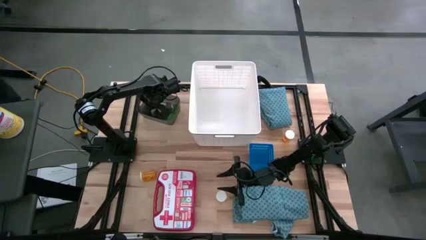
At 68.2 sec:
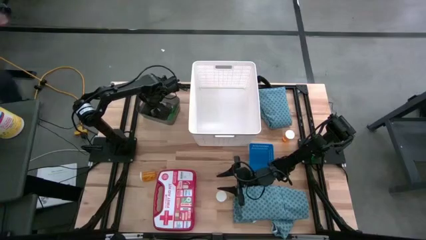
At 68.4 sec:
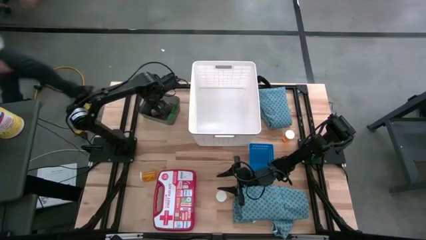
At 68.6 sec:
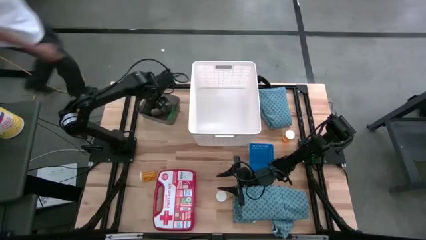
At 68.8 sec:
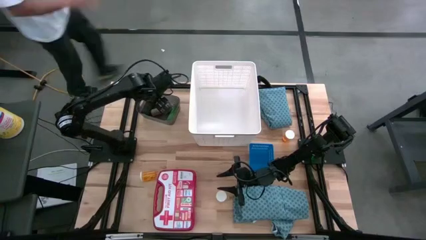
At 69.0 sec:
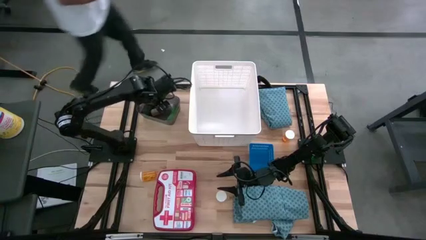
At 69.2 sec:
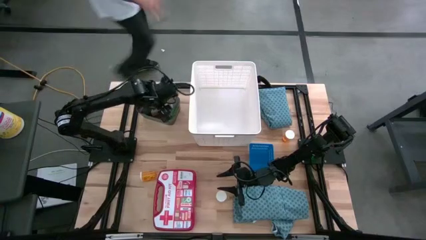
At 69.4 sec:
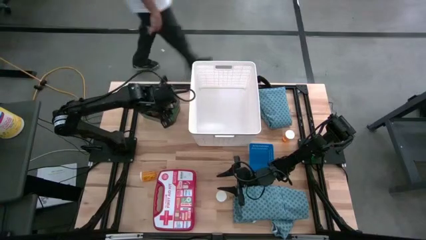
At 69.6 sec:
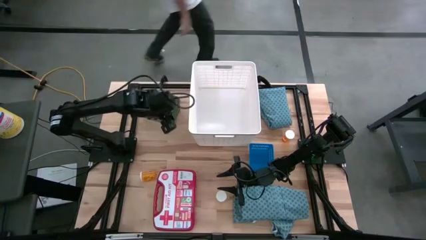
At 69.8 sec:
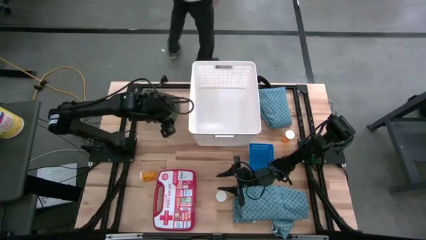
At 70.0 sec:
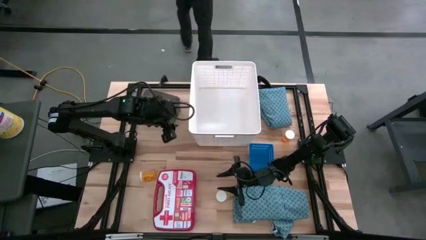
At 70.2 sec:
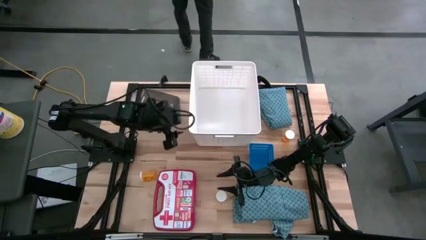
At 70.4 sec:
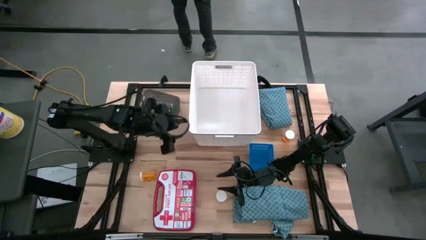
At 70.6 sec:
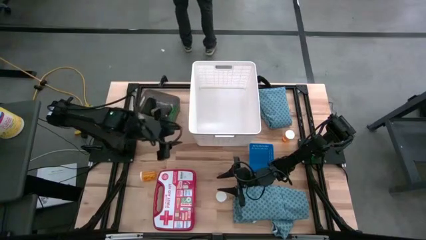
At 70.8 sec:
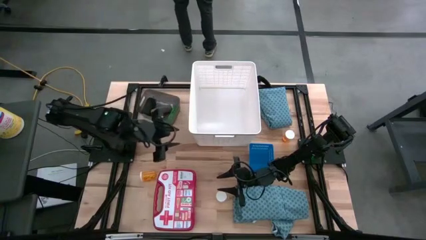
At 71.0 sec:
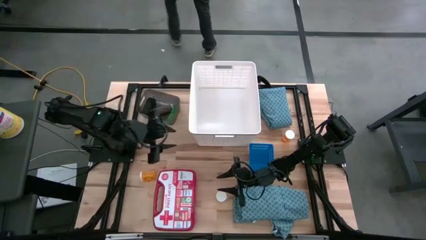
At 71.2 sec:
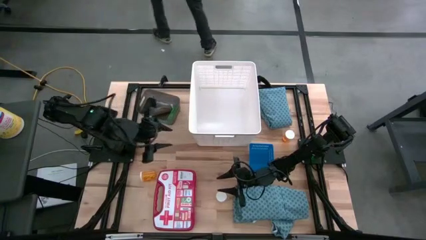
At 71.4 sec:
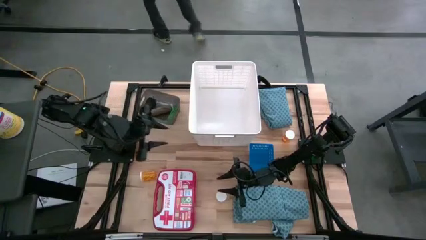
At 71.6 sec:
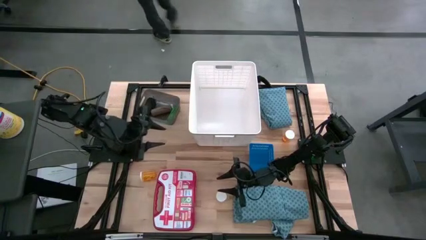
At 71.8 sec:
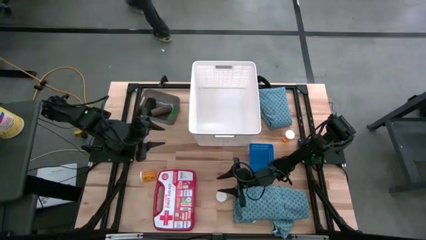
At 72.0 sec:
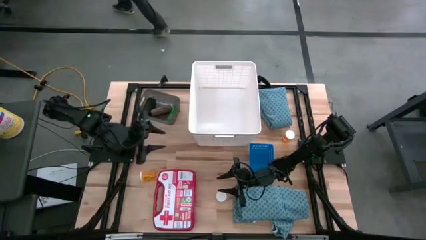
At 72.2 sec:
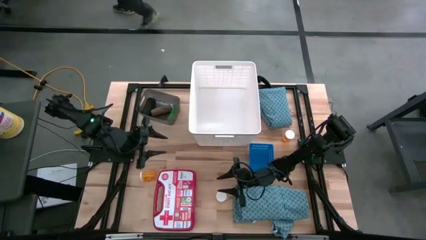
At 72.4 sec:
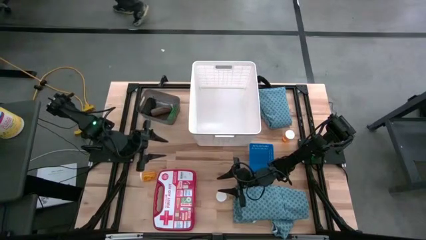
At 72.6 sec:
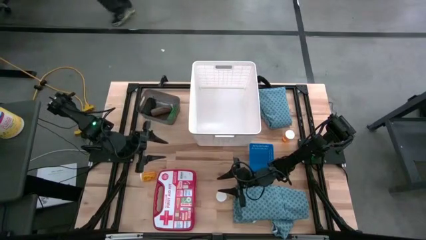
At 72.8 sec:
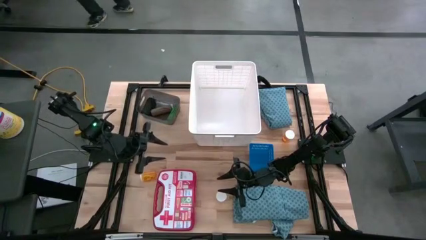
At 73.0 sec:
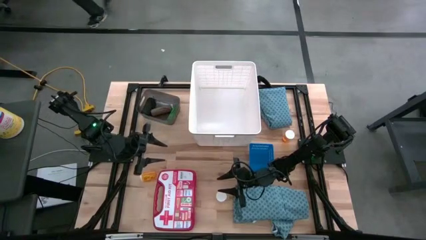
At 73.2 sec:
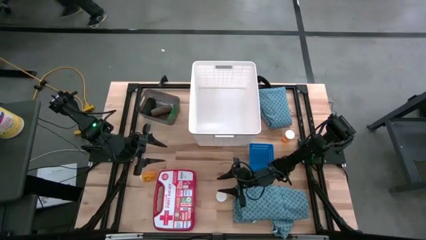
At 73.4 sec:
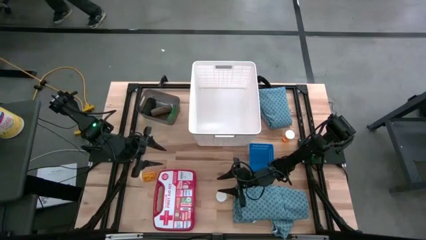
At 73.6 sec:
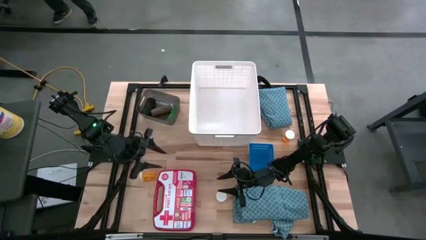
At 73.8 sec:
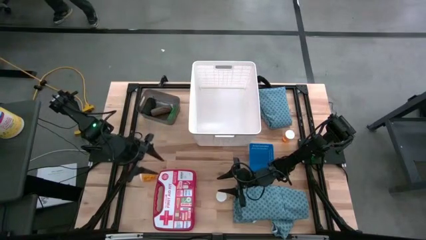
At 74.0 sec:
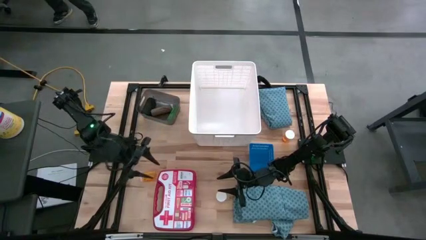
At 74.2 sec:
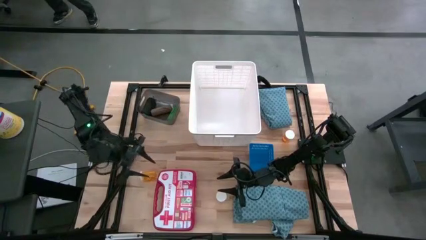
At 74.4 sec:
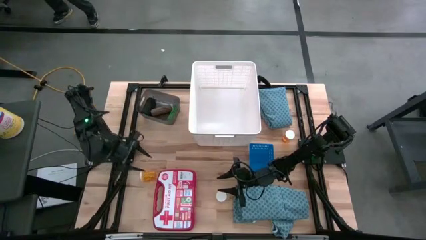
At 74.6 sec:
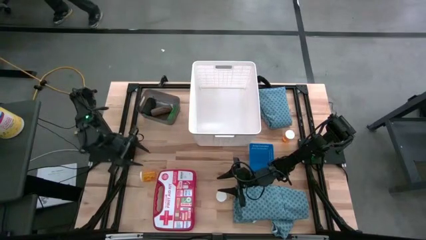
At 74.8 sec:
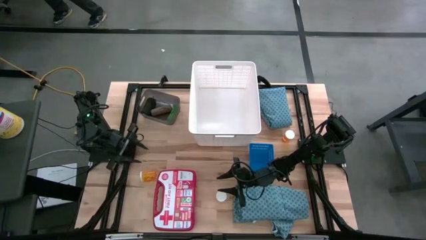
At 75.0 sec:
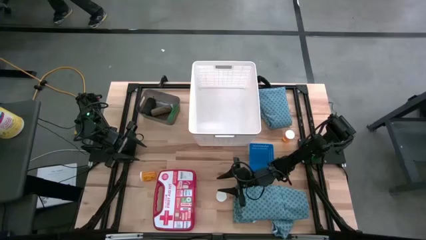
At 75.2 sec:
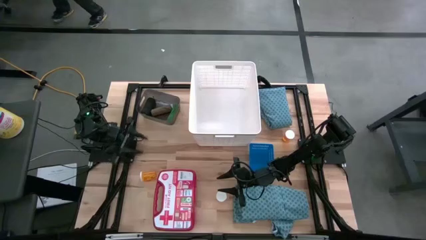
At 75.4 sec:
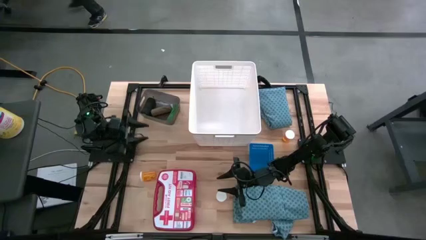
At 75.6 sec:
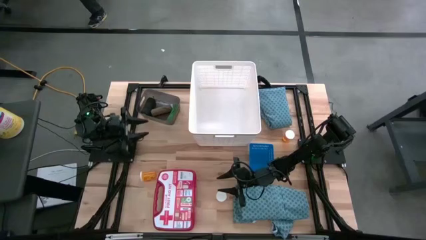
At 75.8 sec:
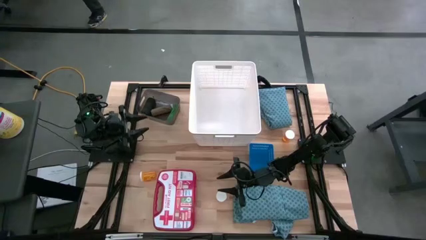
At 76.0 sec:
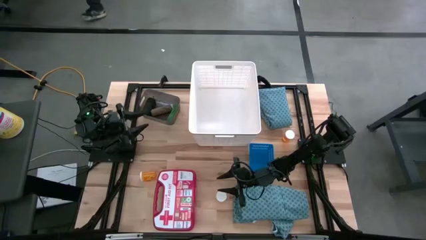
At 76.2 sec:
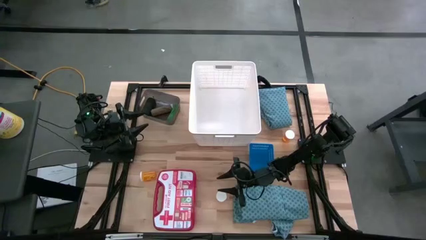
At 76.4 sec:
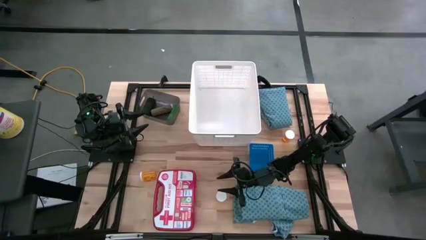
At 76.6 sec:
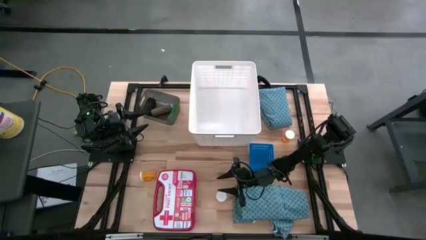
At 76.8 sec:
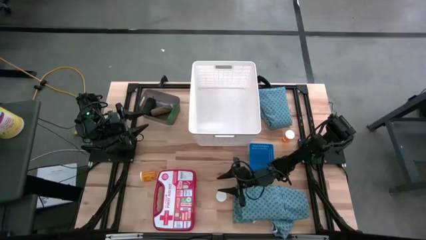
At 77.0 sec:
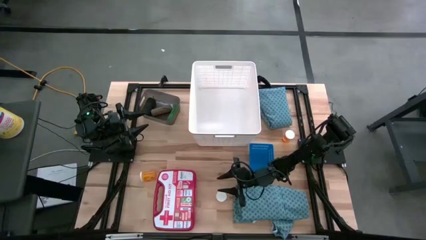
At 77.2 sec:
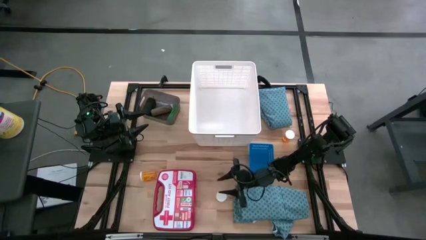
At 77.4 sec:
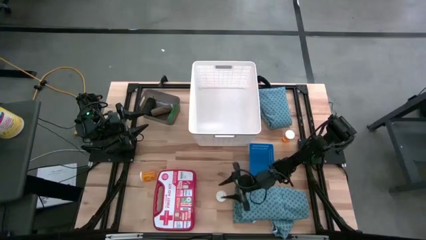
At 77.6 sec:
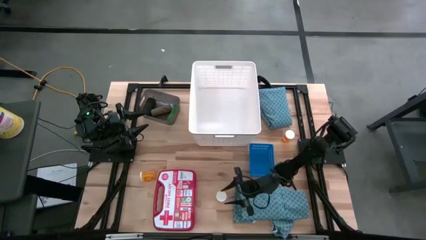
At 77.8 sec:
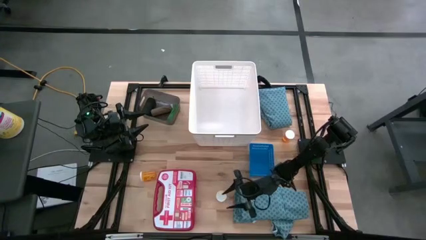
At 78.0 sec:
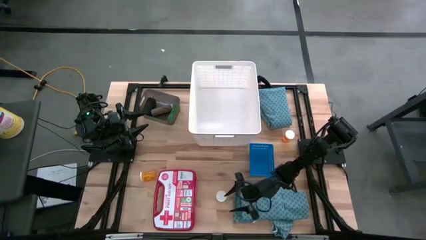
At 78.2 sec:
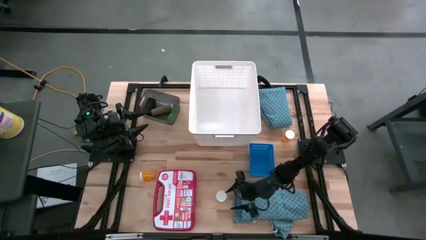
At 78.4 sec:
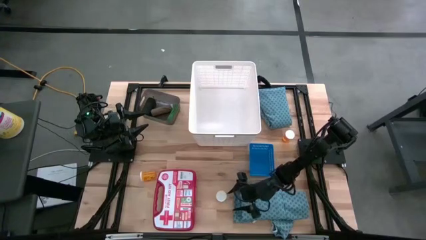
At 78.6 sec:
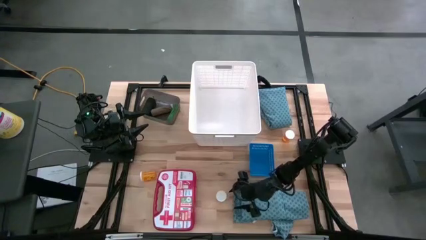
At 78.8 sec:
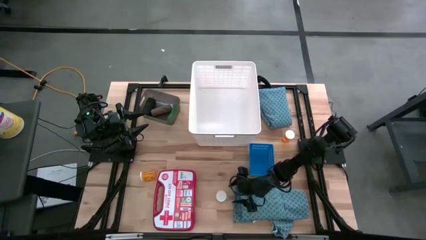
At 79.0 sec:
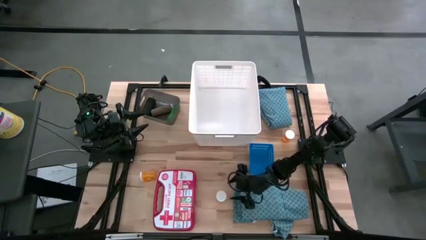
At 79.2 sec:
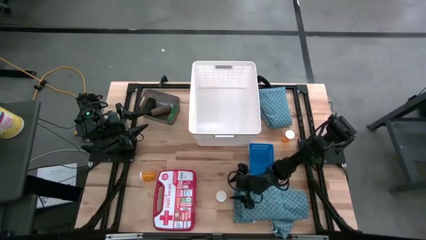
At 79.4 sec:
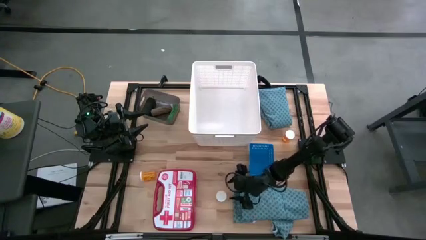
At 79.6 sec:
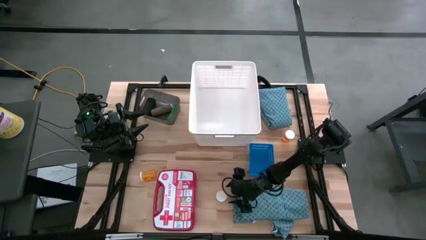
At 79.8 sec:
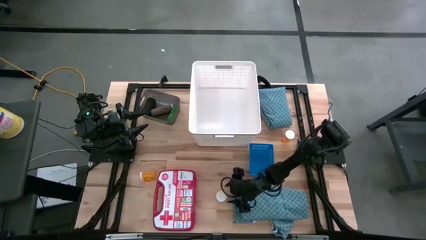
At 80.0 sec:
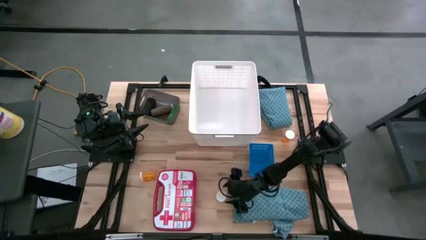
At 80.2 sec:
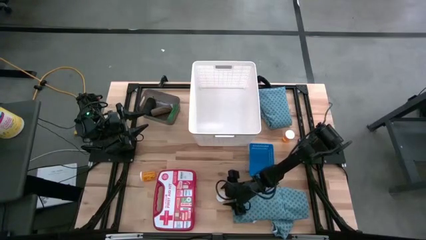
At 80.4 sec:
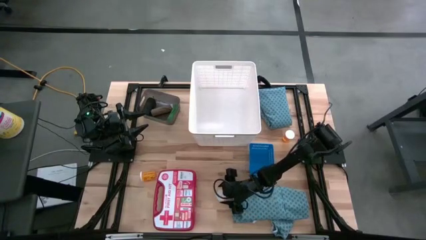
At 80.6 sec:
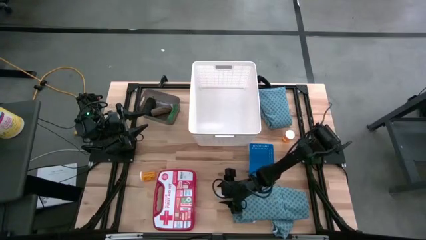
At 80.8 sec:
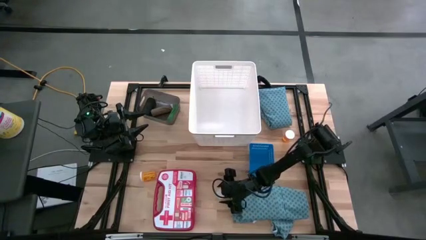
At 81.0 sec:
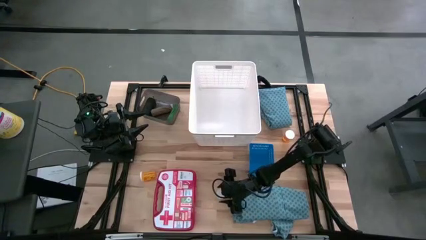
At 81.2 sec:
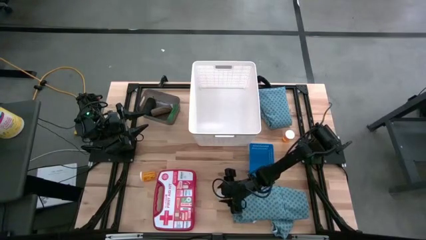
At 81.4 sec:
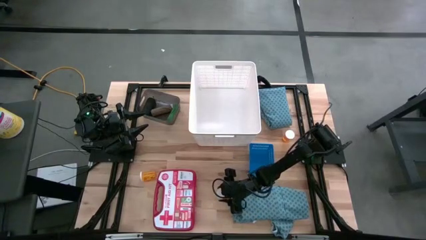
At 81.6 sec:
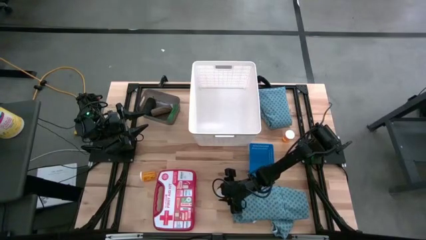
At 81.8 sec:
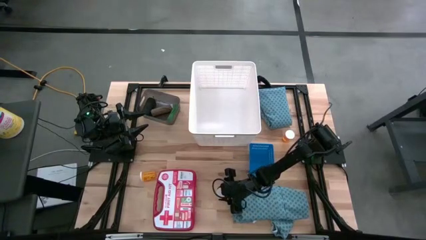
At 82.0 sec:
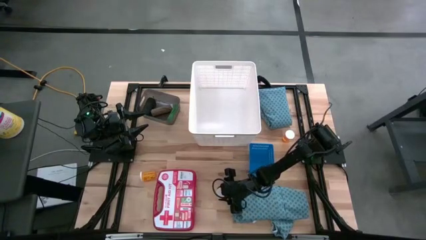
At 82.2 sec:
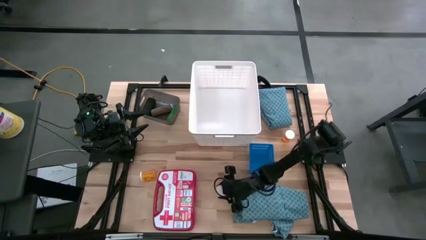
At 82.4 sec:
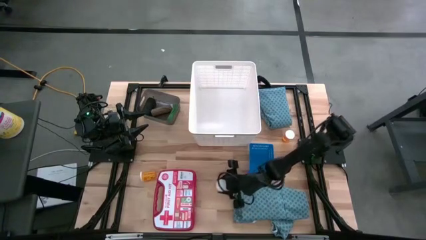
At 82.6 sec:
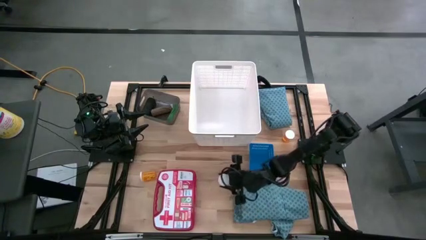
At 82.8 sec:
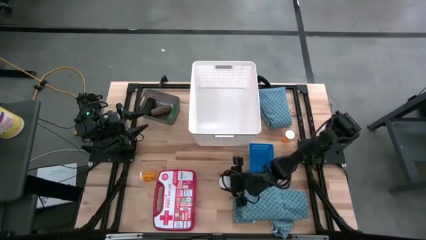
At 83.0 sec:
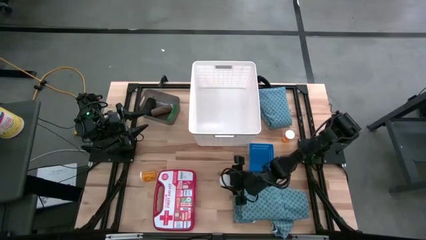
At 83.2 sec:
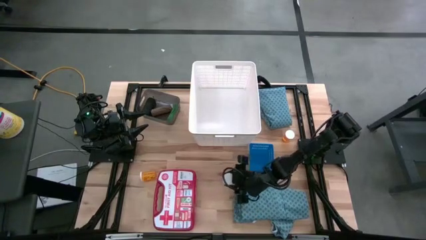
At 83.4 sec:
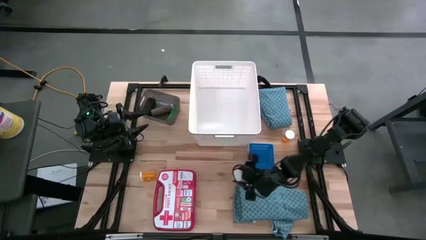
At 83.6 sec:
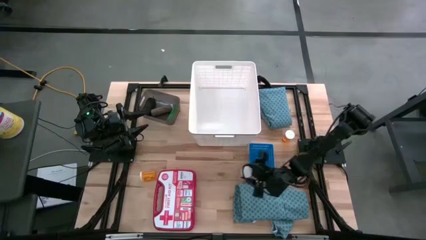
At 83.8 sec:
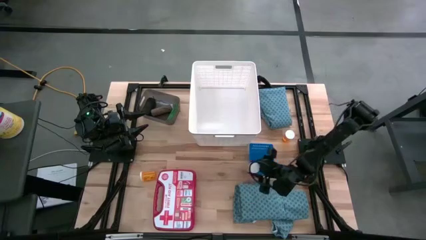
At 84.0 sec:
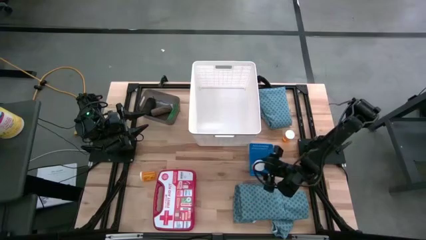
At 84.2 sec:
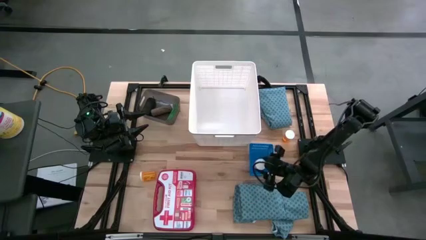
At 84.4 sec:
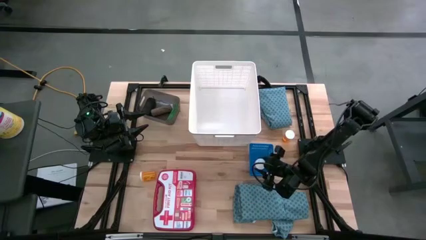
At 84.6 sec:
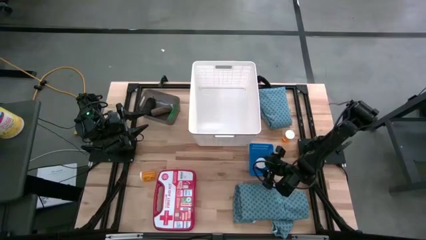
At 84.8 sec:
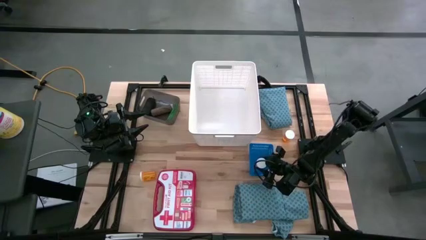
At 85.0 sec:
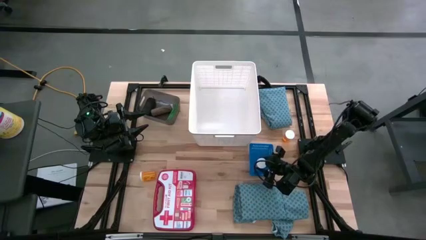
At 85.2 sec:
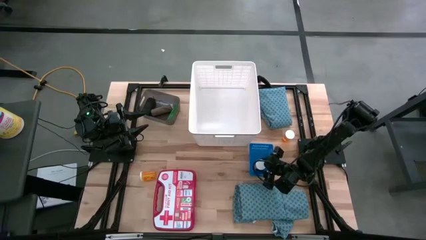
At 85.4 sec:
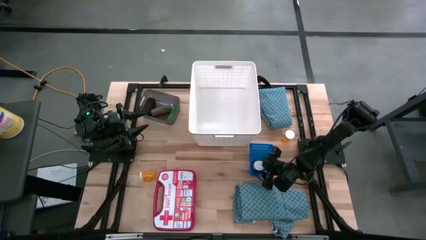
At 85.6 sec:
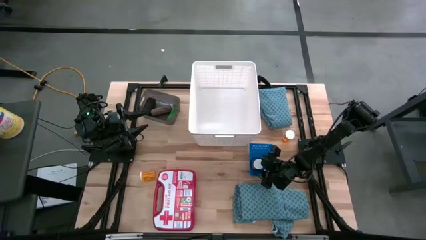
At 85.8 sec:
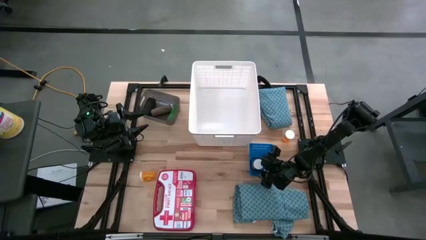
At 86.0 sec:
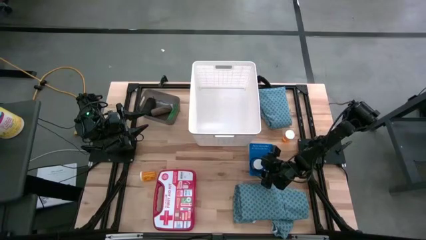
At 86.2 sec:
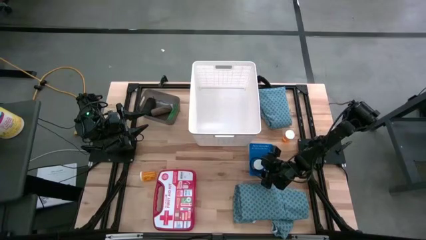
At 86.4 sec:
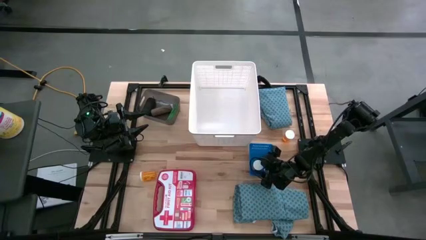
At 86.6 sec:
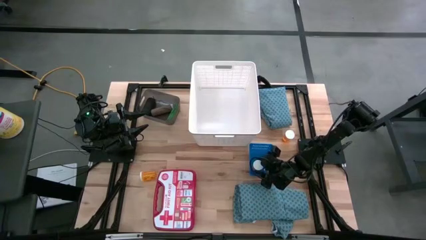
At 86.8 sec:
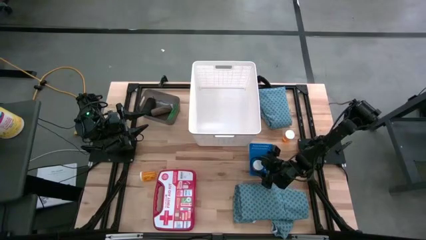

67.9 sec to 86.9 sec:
Task: Pick & place medical supplies in basket/bin
Put the middle orange pill bottle into the blue bin
